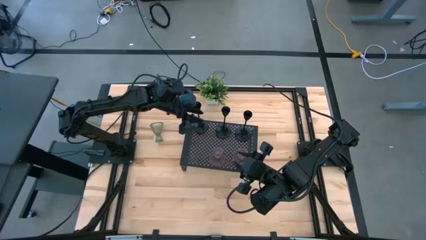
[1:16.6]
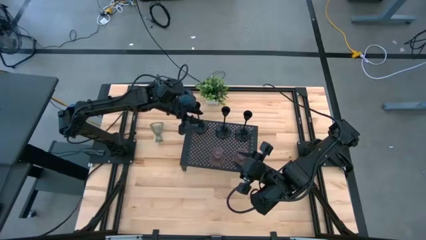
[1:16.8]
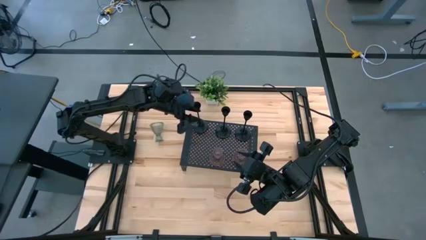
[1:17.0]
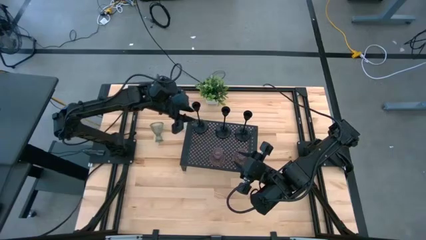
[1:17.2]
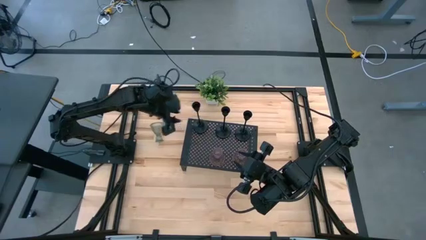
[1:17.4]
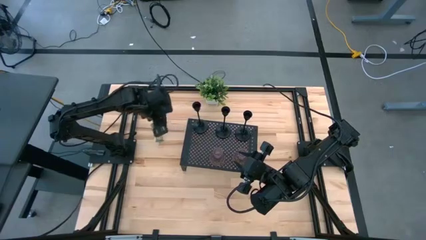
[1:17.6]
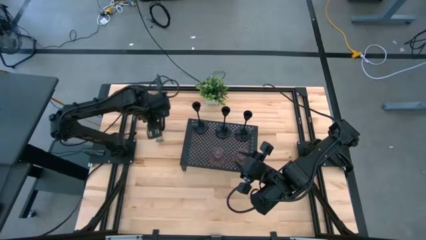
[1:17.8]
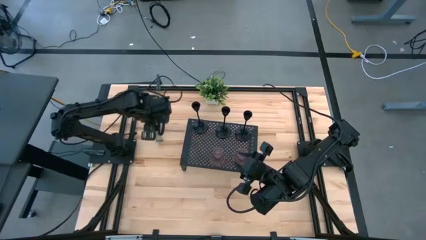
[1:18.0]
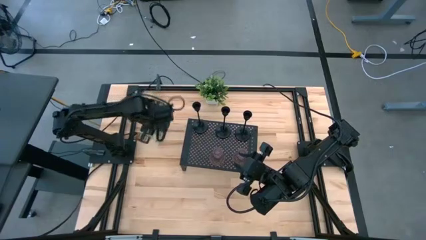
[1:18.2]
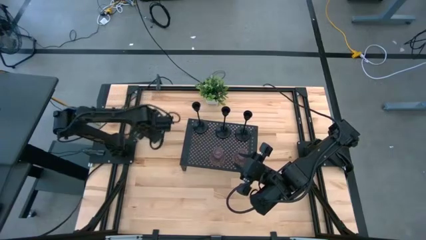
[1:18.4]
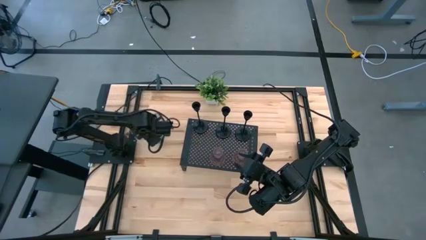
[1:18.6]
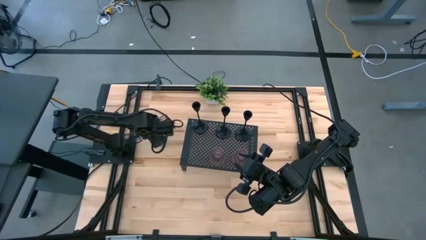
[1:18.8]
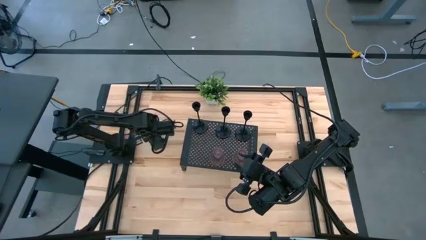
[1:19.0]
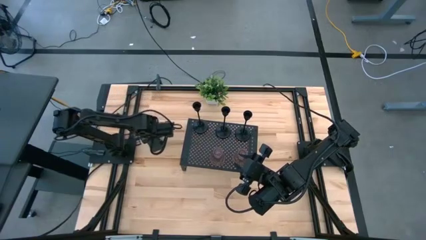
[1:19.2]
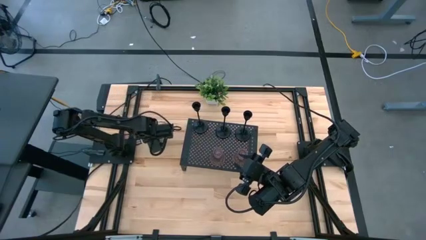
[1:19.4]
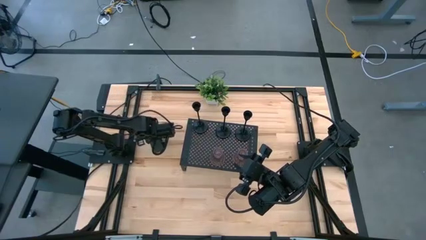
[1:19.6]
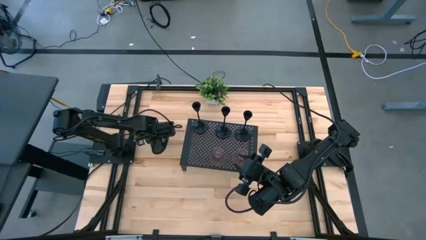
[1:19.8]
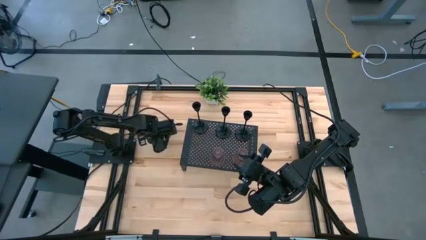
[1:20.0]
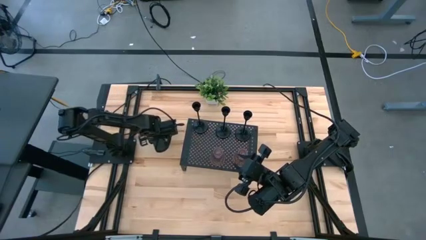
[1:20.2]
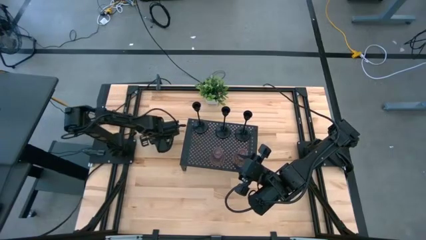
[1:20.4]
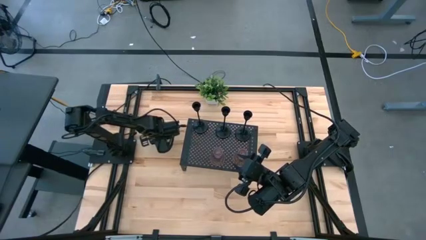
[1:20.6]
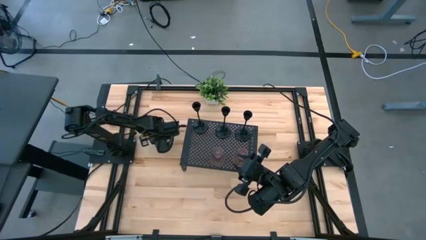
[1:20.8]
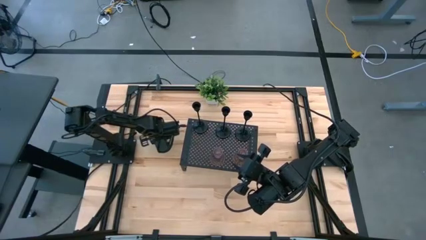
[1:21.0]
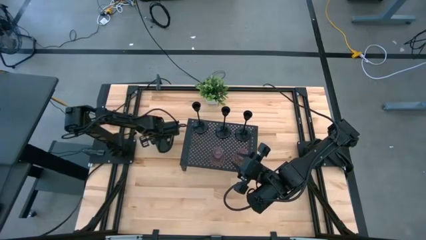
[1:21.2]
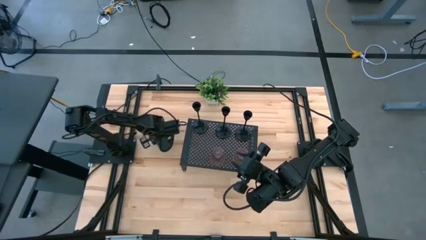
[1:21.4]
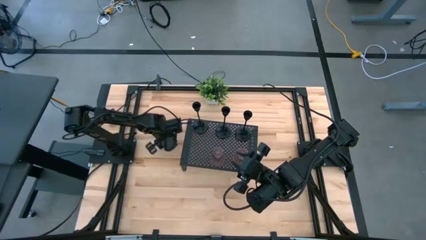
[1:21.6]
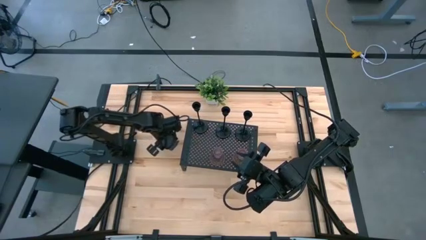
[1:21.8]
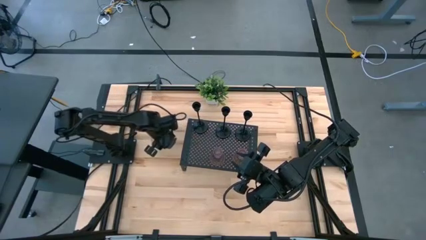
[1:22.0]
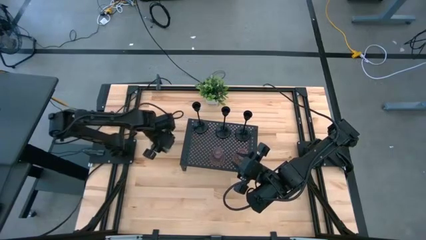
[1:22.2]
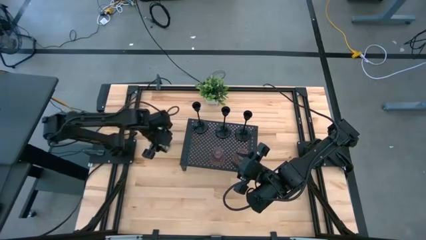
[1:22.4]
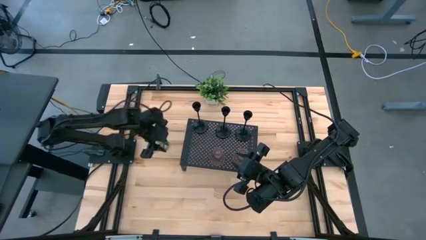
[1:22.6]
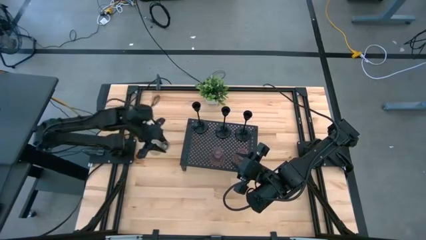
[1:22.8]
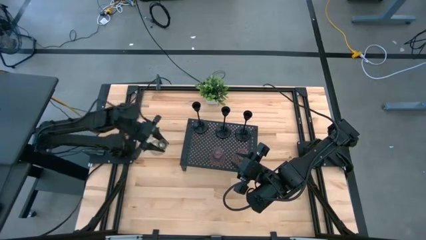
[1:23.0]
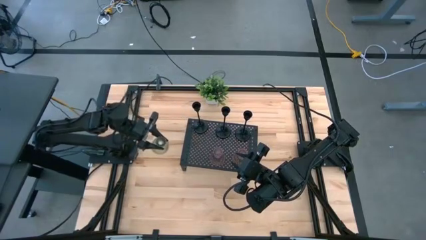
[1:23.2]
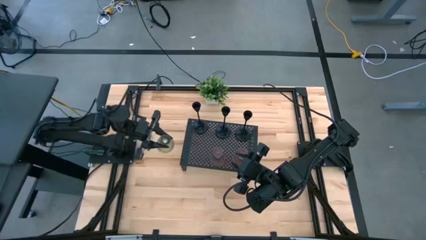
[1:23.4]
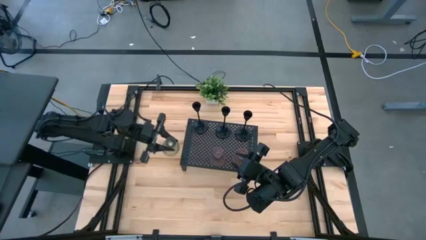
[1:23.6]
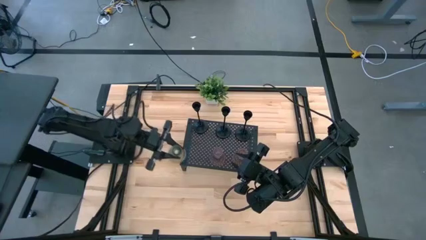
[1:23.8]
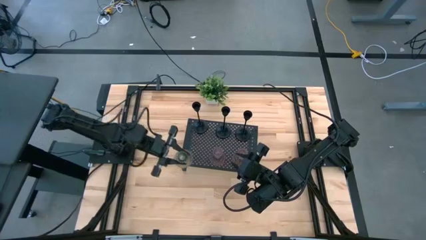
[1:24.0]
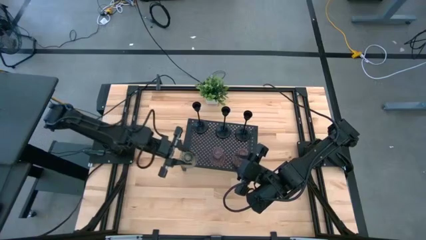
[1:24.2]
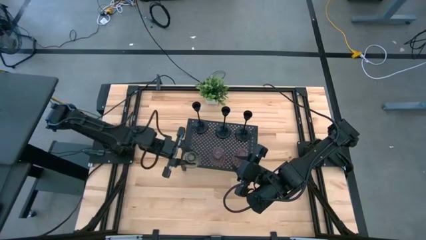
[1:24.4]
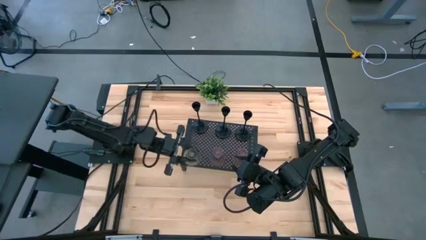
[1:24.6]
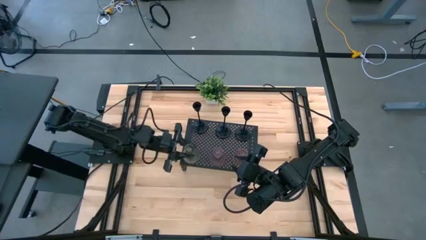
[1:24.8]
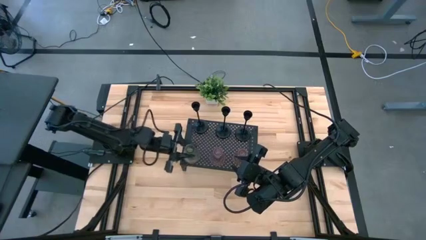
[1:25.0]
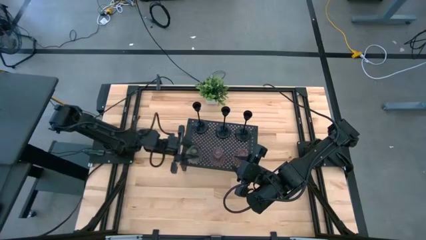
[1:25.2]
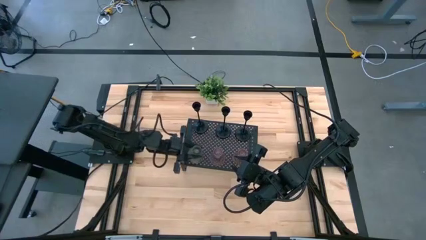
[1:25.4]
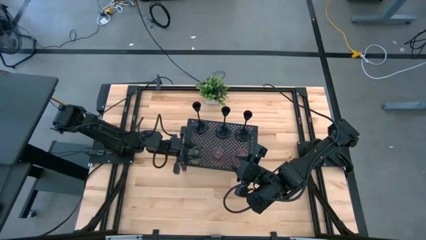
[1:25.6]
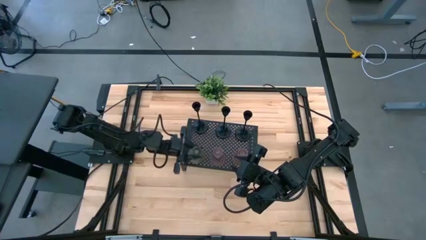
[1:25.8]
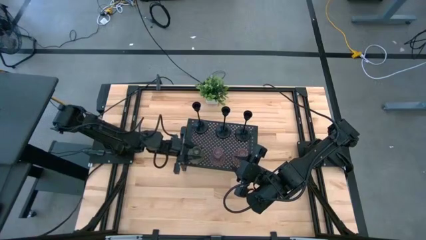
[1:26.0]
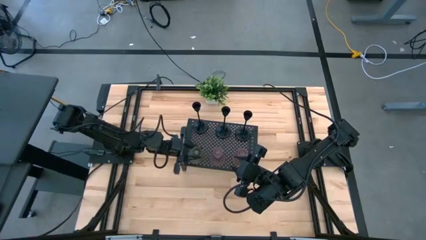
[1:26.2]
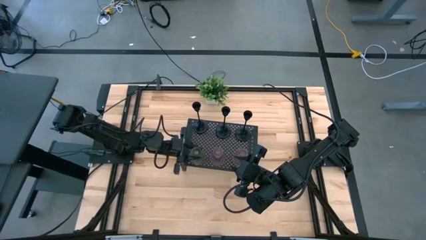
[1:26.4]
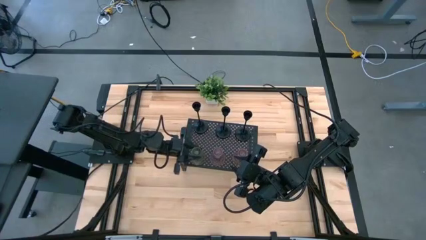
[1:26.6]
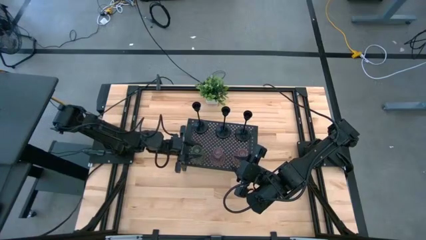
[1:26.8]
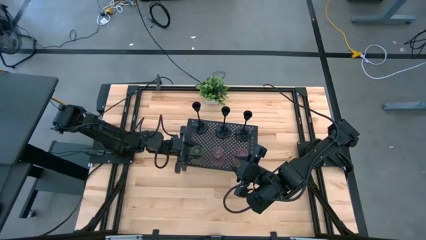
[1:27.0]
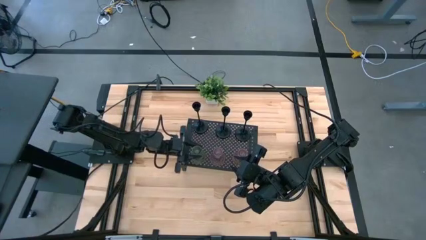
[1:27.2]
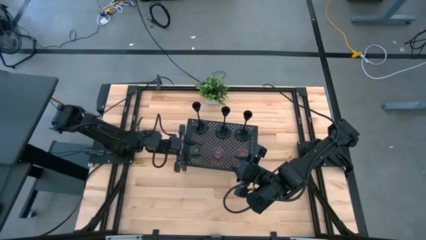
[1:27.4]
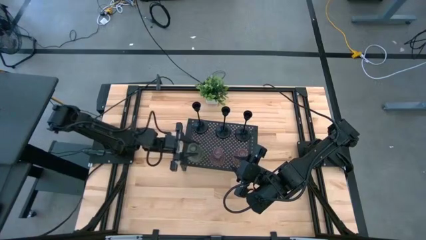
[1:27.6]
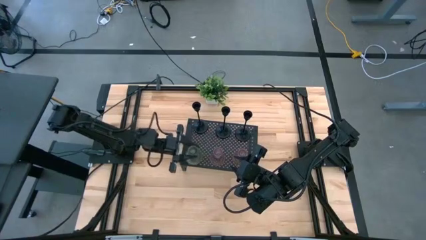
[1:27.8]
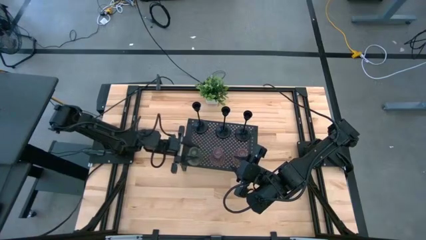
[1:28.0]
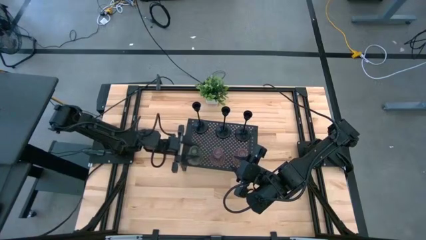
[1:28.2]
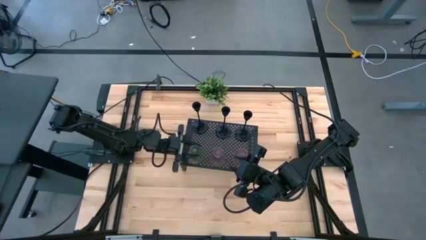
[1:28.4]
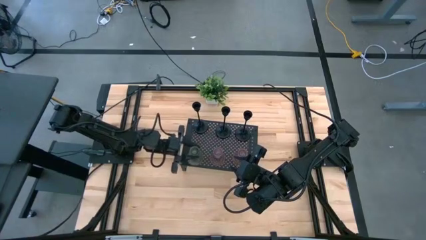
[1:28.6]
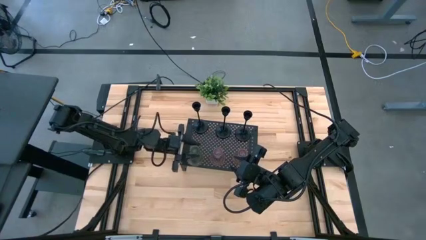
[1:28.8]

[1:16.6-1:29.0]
Task: Pick & Place candle stick holders
Align the green glass candle holder with the black candle holder on the shelf

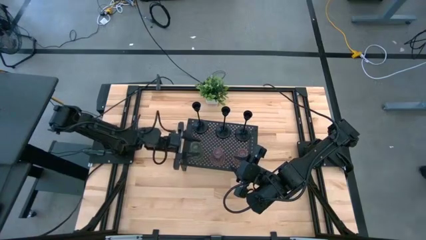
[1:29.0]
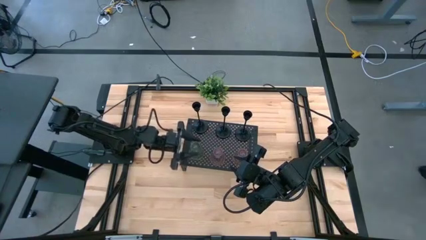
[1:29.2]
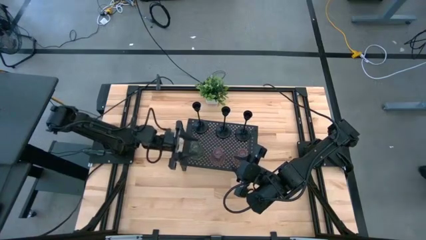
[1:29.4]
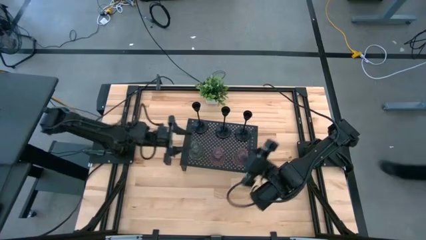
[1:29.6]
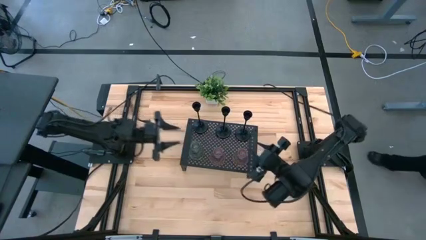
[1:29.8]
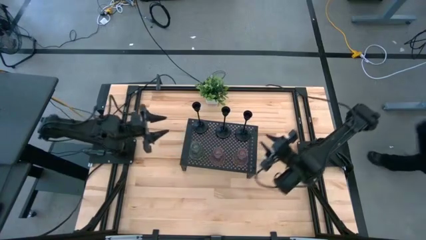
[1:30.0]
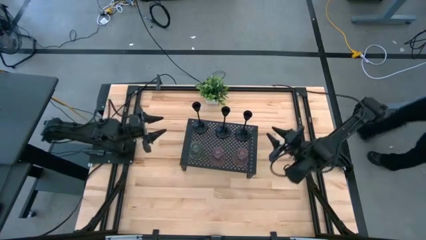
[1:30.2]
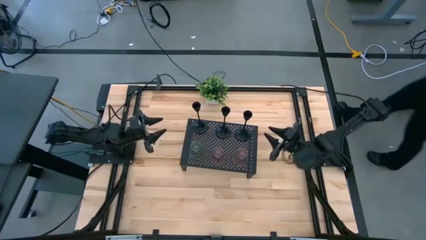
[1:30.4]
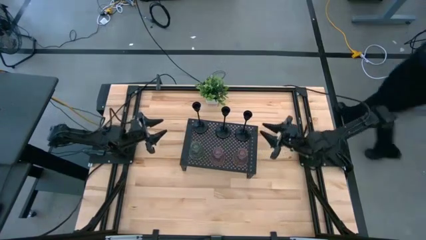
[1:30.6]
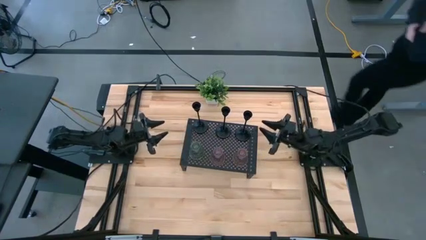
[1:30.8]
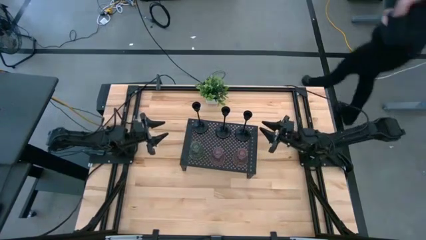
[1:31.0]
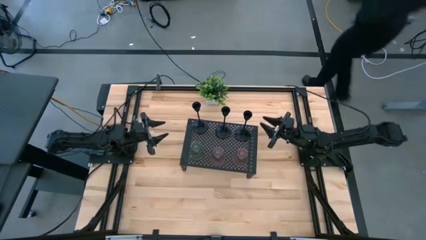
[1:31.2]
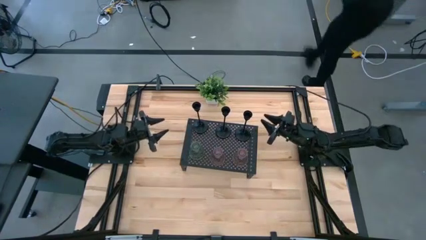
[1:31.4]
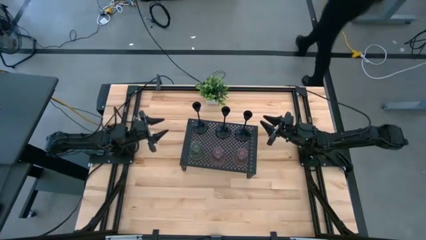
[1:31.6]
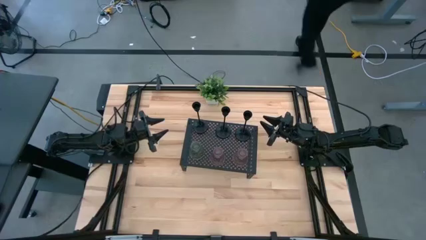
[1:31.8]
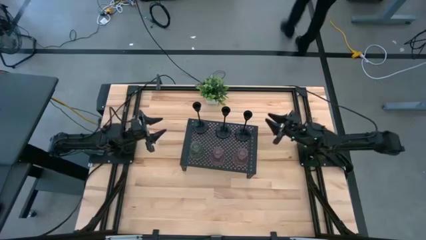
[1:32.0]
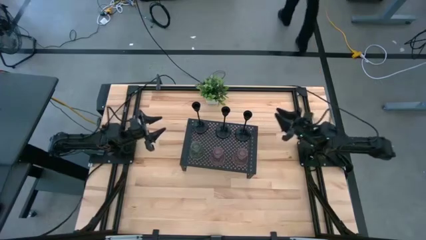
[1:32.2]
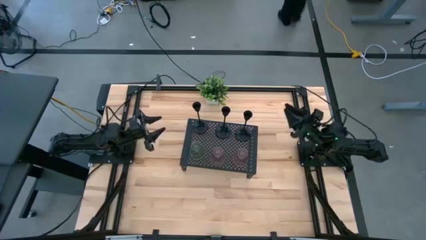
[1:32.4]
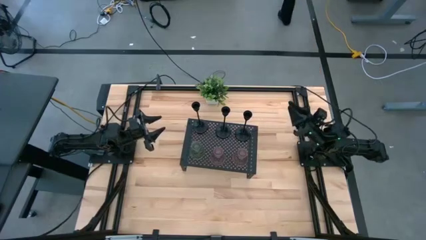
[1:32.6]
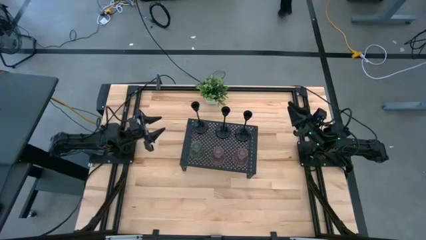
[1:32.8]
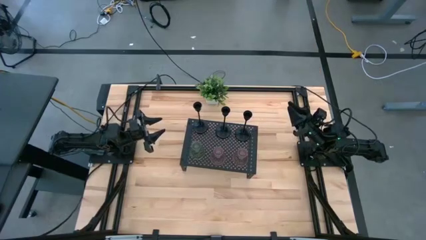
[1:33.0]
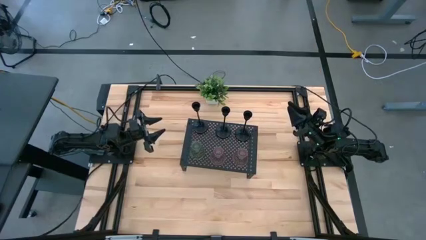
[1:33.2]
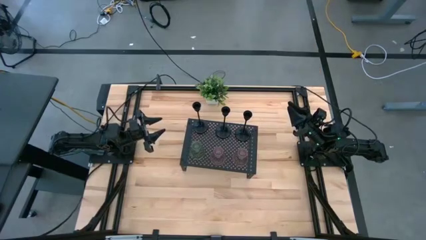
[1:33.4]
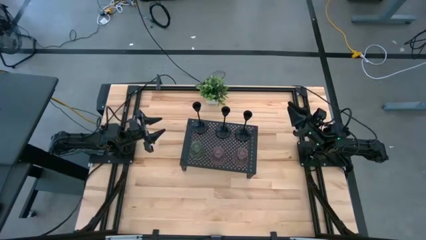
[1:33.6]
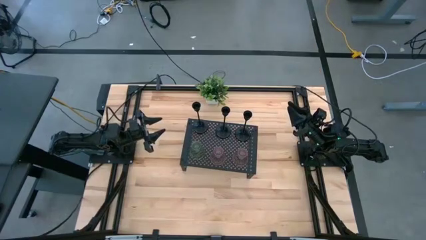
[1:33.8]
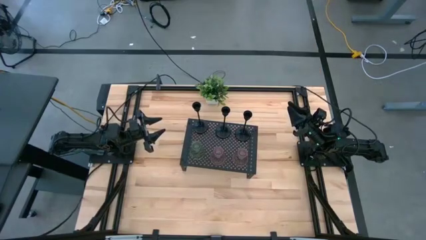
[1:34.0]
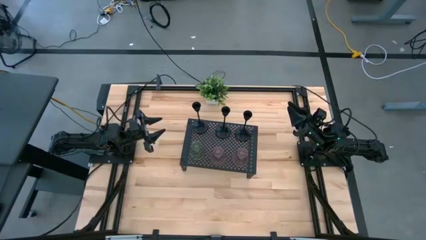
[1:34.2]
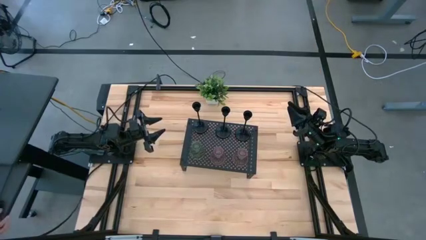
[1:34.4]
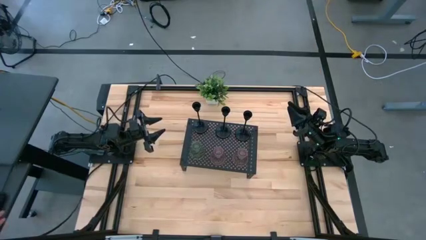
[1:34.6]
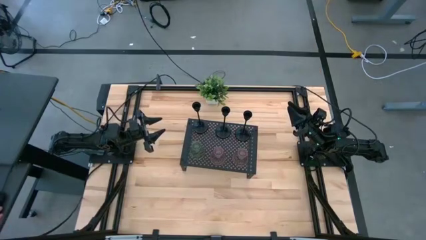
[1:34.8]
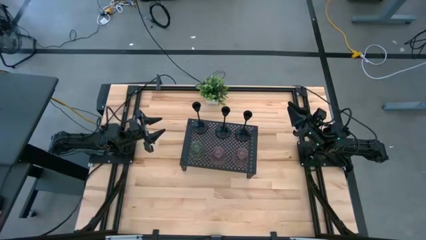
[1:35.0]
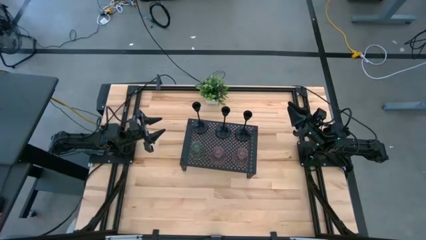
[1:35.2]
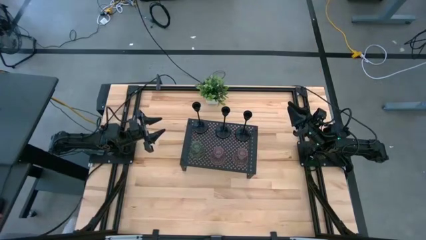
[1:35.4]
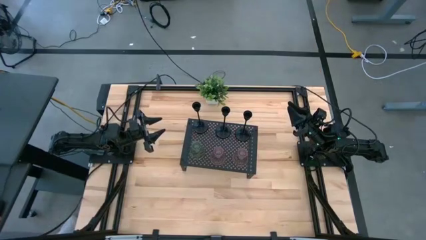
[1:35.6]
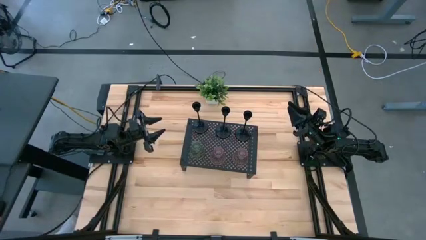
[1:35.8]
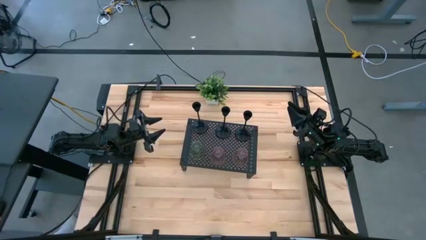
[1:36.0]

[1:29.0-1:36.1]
Return to Home Position
